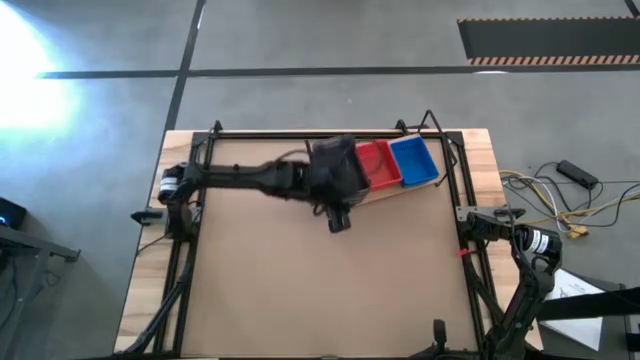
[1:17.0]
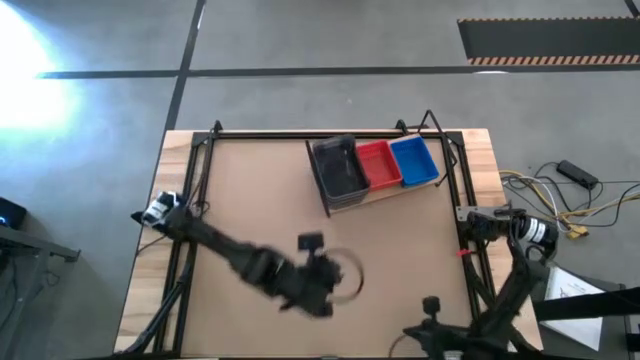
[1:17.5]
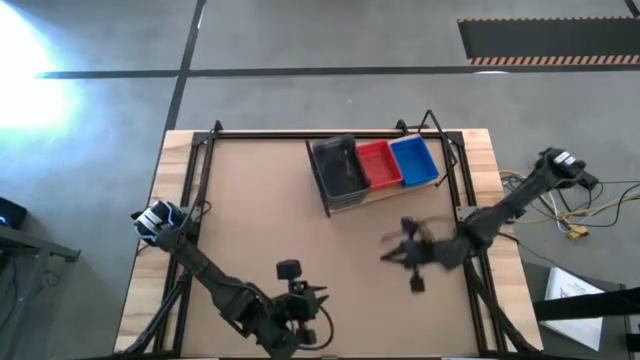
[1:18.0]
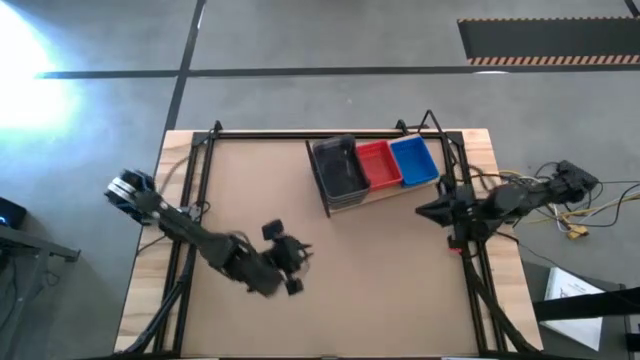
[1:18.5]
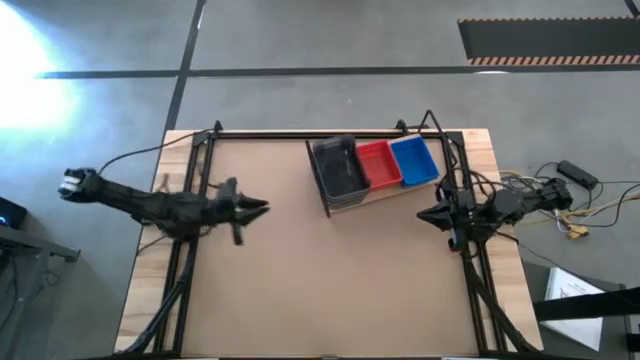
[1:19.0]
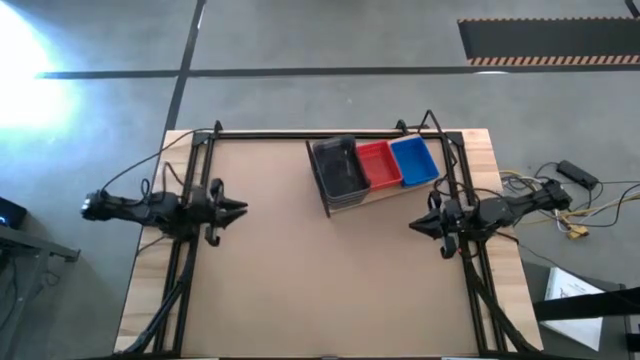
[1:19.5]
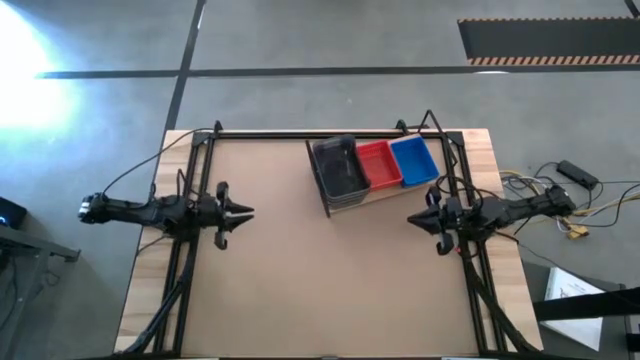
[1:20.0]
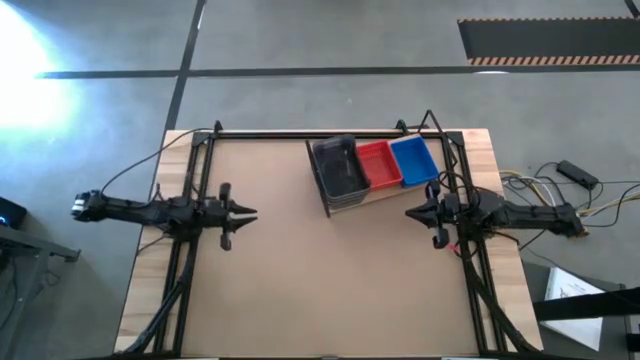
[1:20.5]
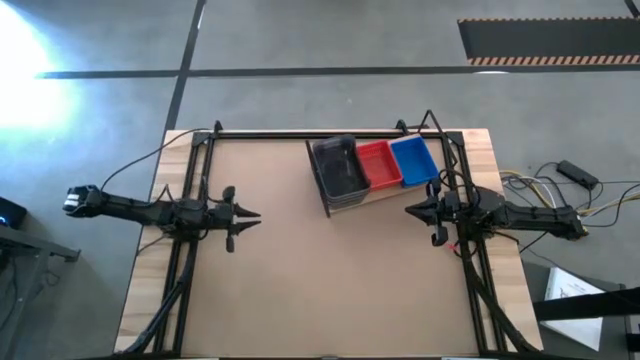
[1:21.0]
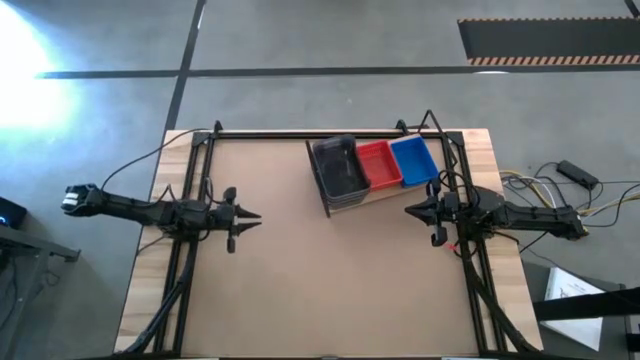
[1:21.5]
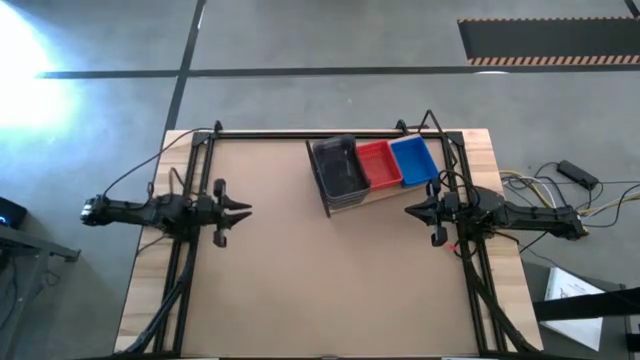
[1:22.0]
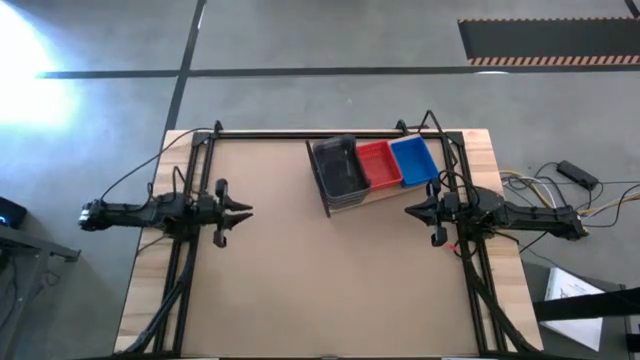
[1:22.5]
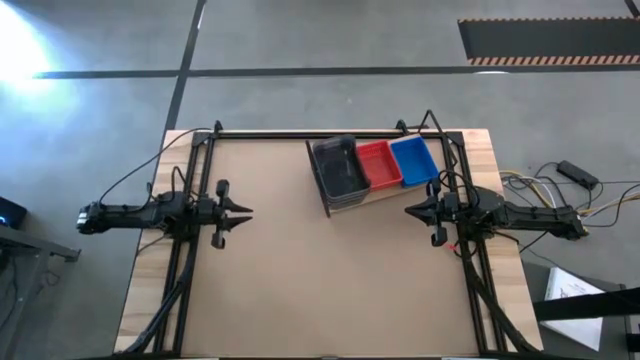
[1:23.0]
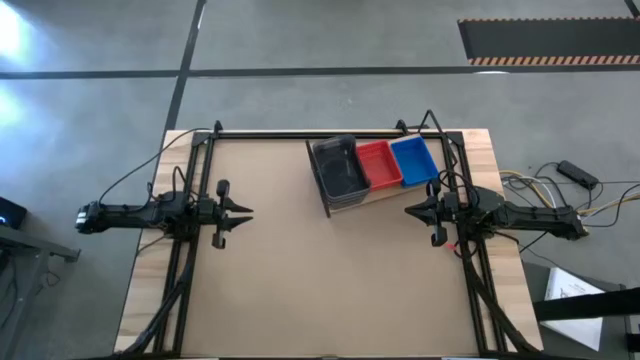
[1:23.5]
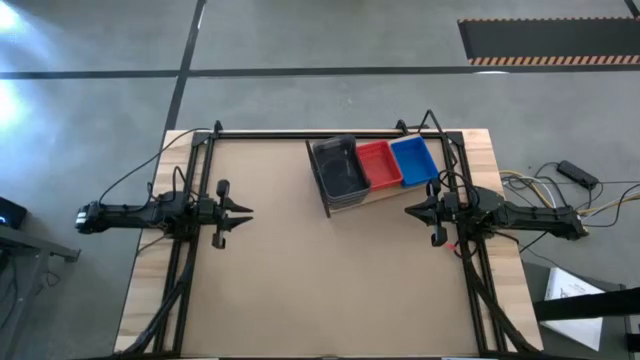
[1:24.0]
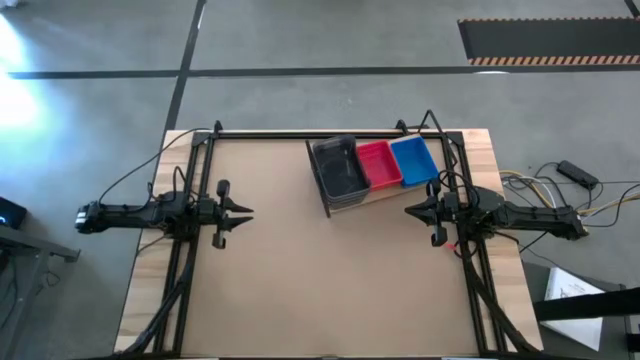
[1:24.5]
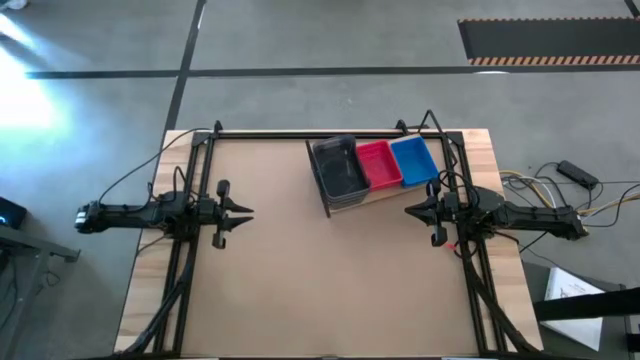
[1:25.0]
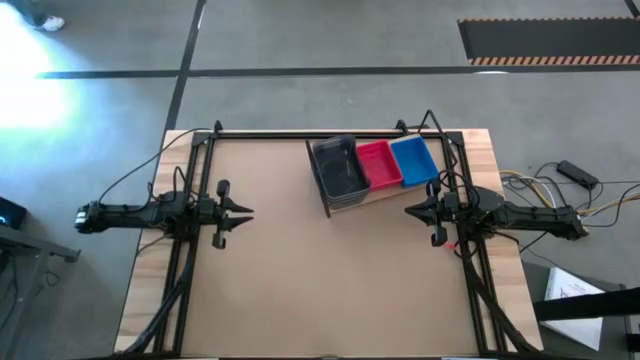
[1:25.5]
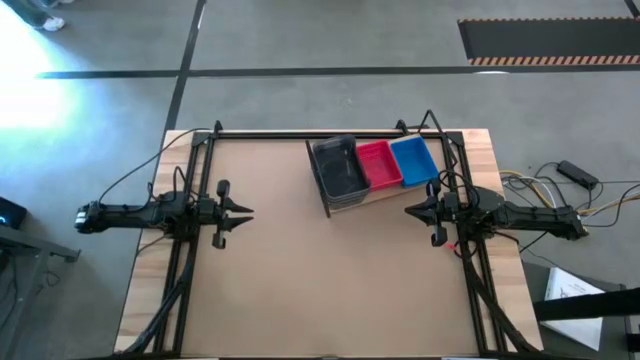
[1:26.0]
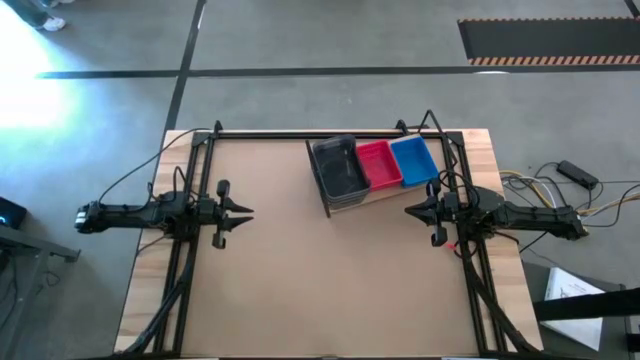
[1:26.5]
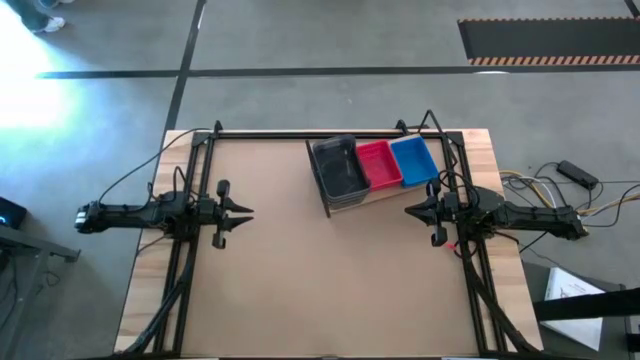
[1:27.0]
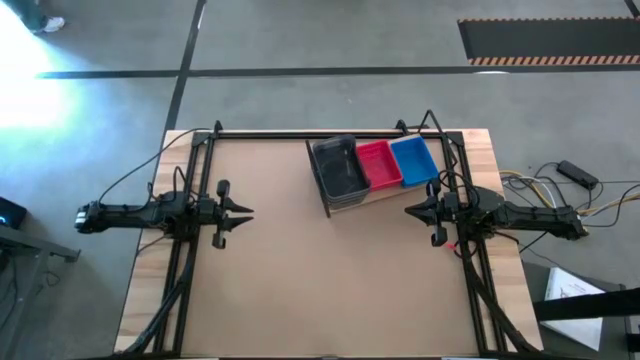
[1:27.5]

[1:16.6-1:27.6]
Task: Stack baskets on shelf by color
Return to Home Position

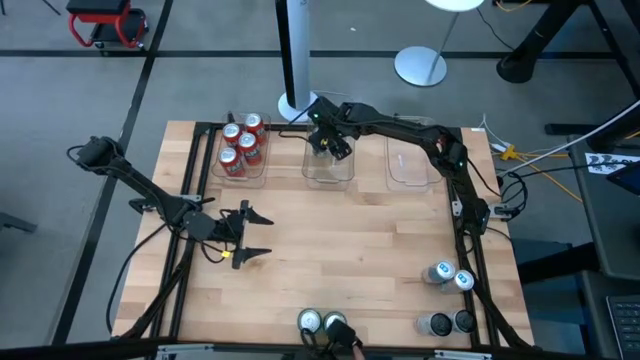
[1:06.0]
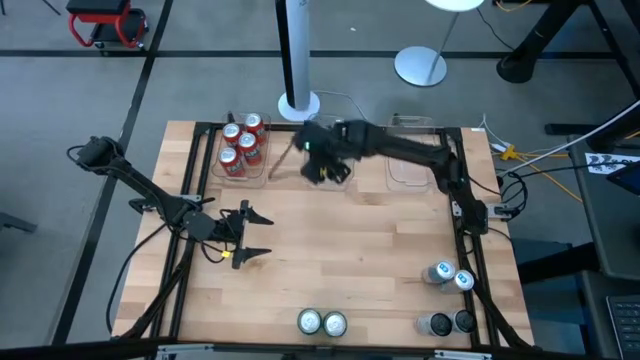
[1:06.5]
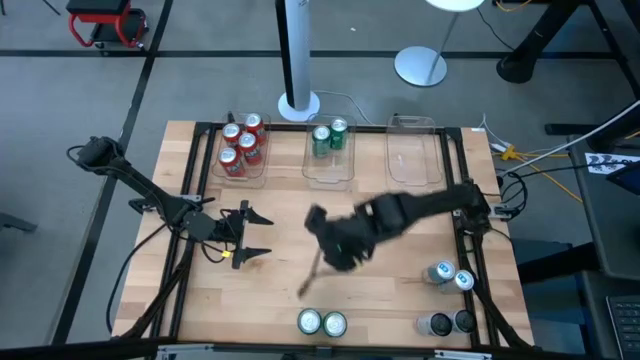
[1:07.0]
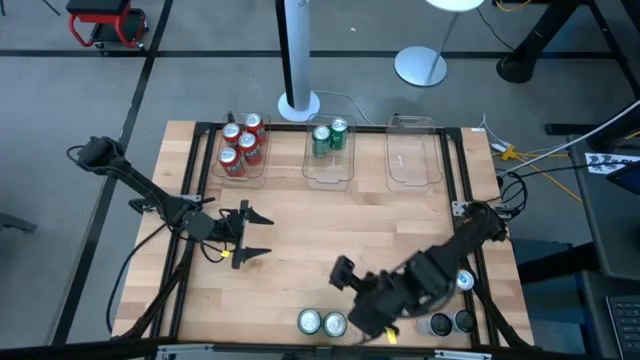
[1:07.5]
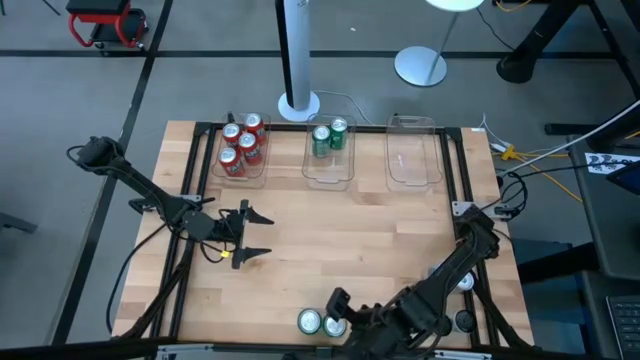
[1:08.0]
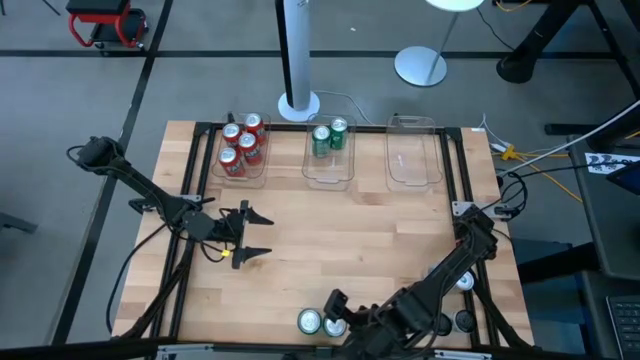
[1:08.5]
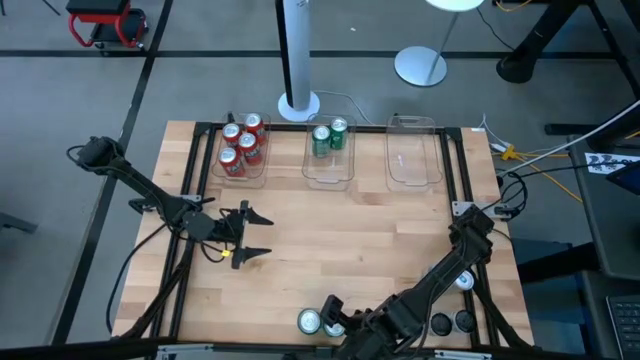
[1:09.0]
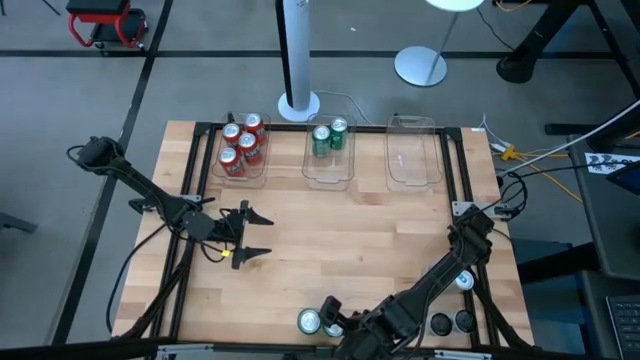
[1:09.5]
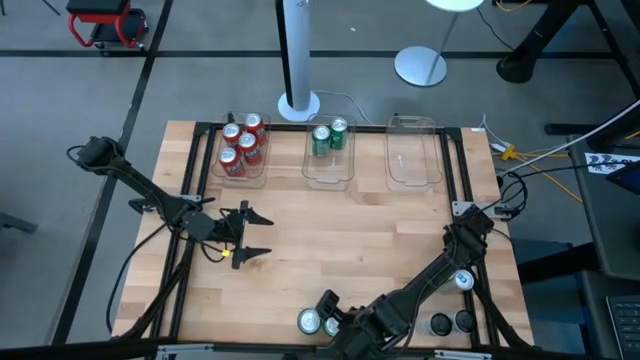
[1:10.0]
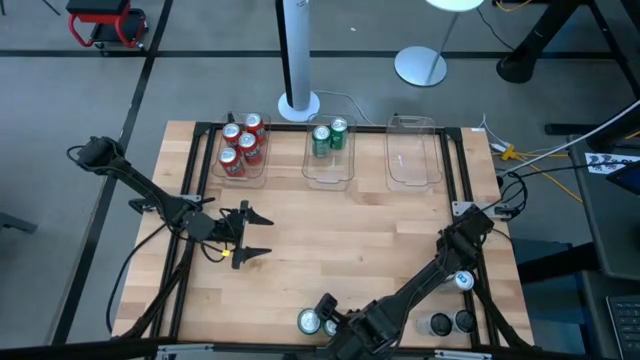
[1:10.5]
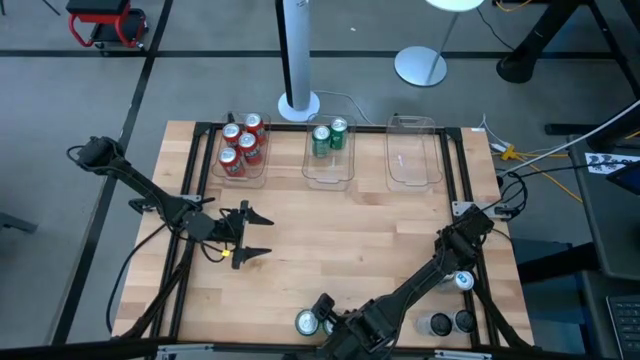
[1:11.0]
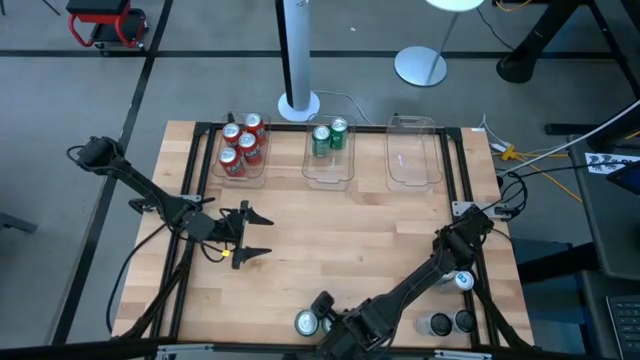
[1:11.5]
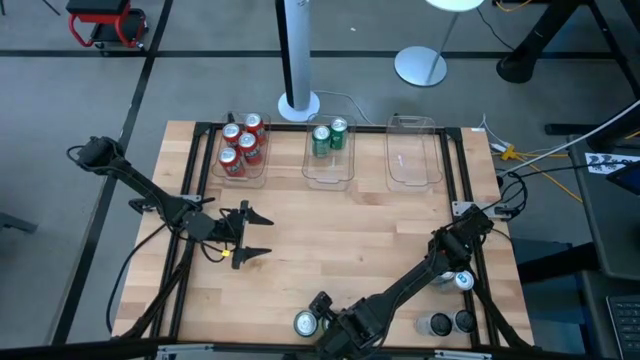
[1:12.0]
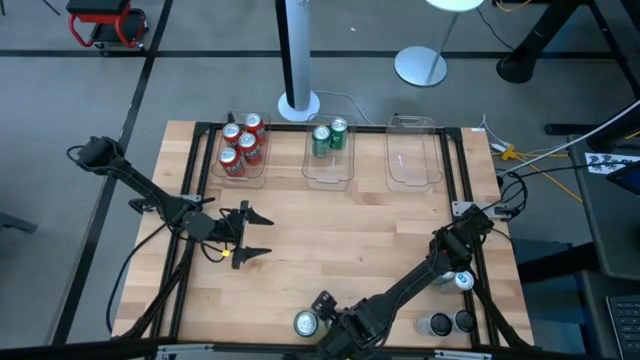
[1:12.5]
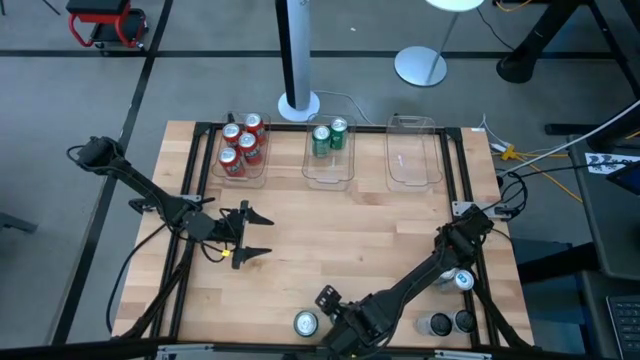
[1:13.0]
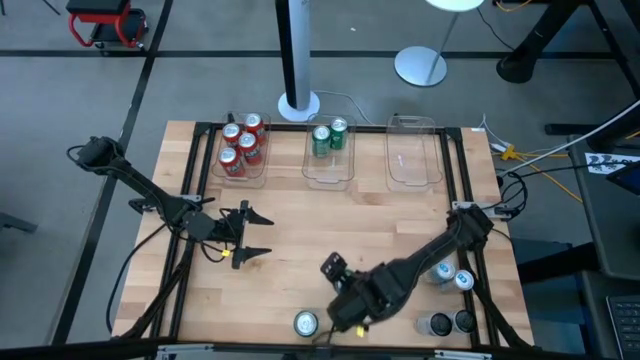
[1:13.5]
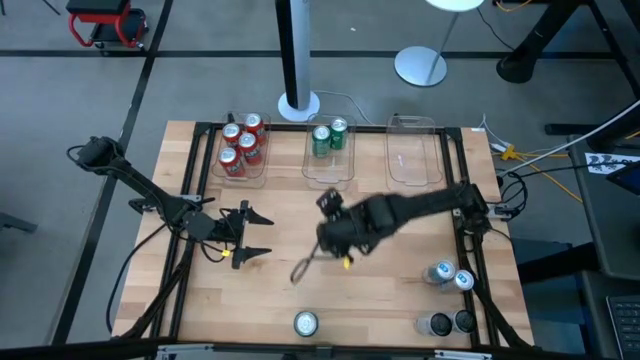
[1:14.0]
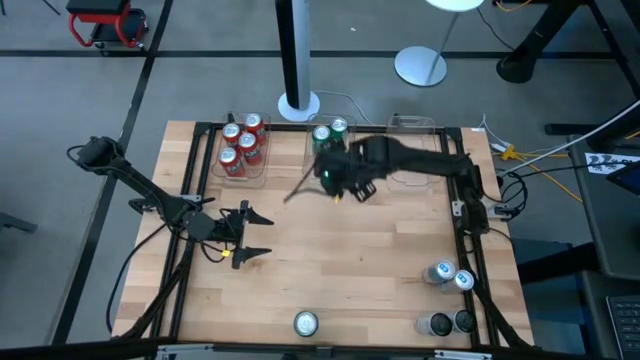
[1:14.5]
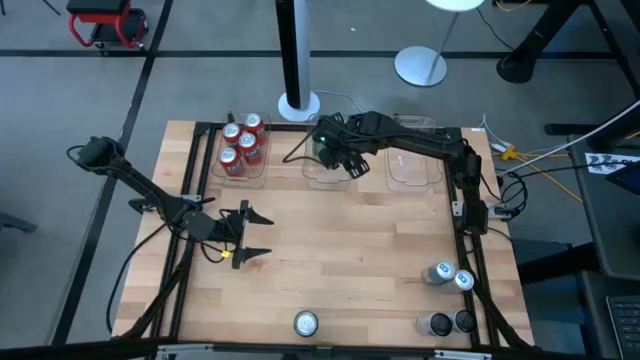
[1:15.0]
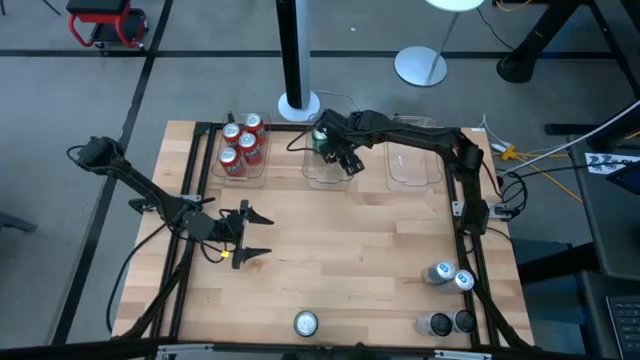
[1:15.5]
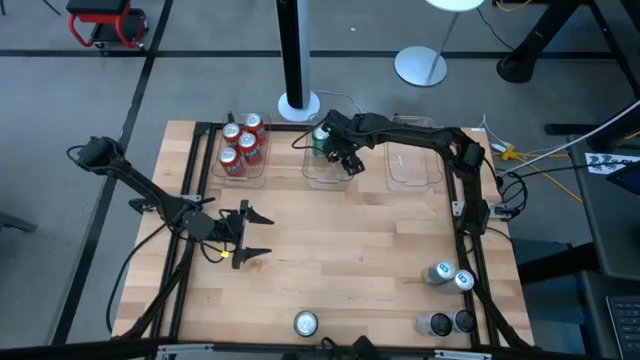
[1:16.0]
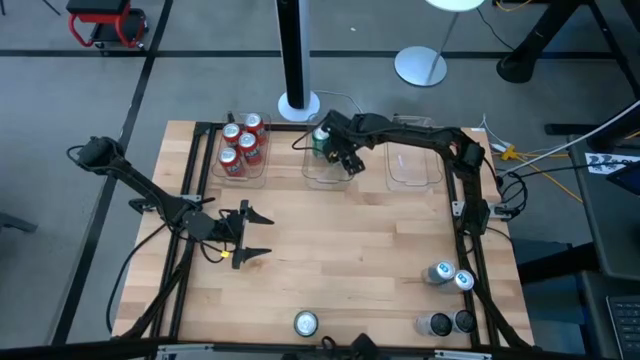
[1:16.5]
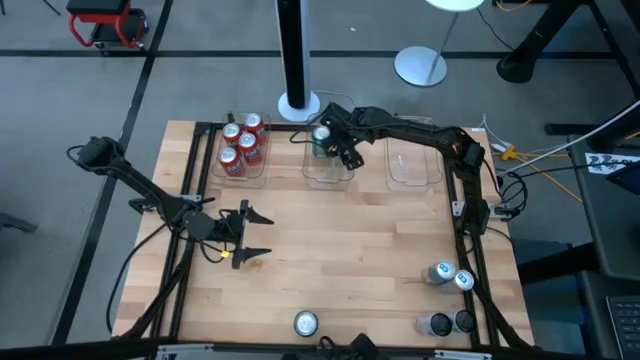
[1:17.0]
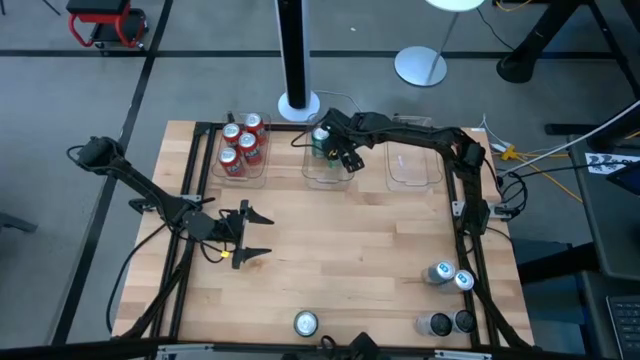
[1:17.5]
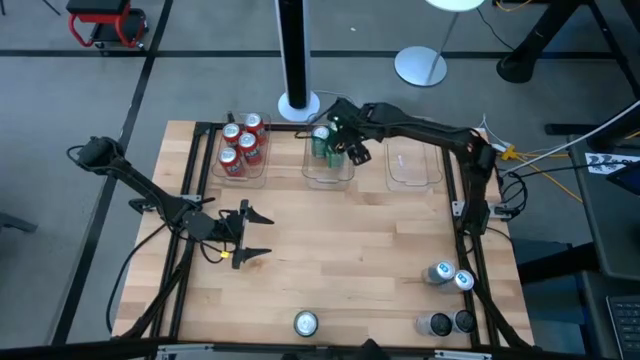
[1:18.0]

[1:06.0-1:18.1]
Task: Sort soda cans
Put the right green soda can into the middle transparent bin
